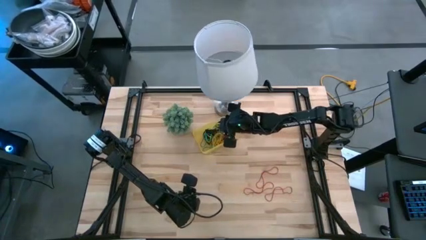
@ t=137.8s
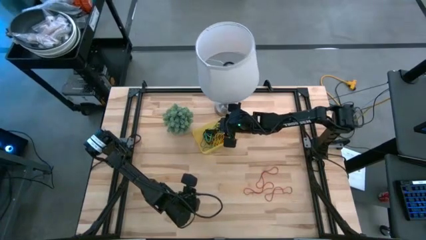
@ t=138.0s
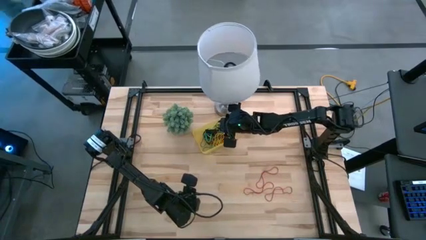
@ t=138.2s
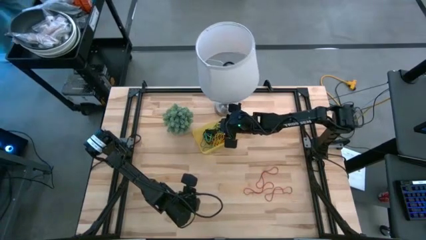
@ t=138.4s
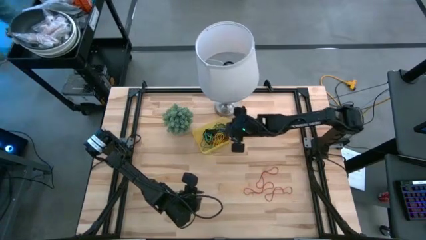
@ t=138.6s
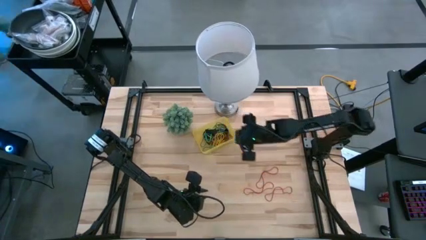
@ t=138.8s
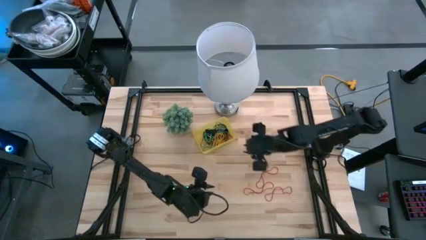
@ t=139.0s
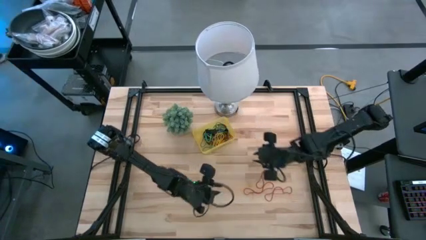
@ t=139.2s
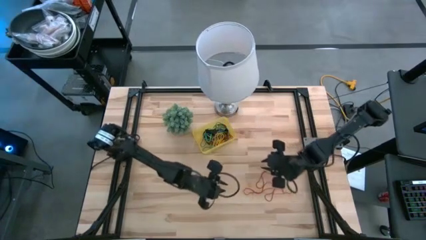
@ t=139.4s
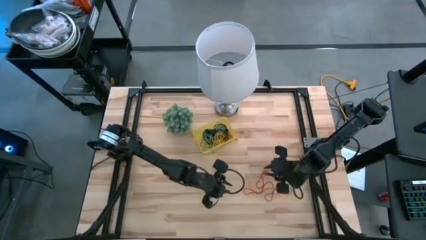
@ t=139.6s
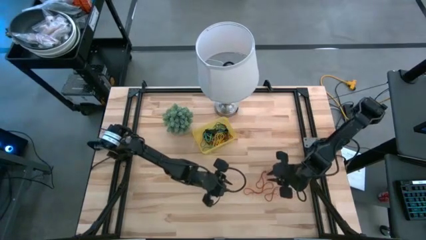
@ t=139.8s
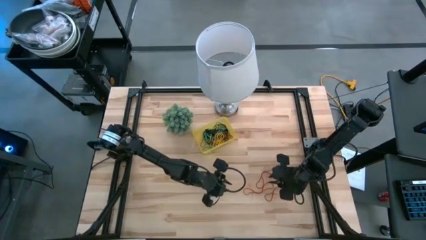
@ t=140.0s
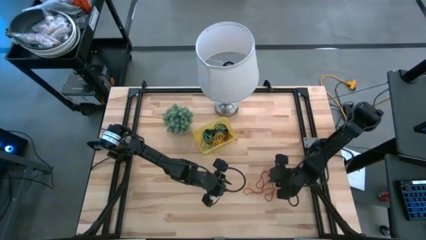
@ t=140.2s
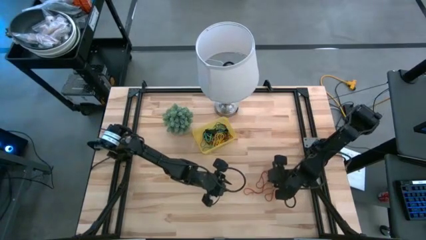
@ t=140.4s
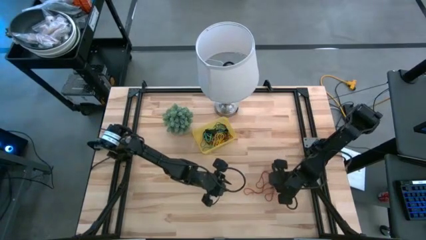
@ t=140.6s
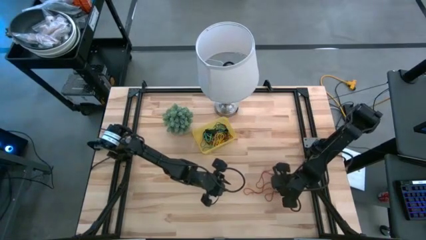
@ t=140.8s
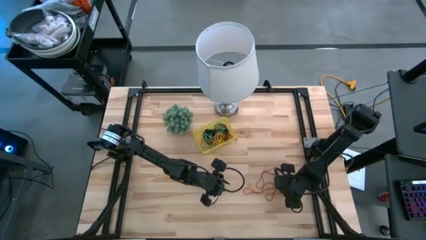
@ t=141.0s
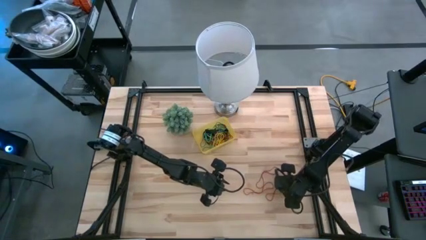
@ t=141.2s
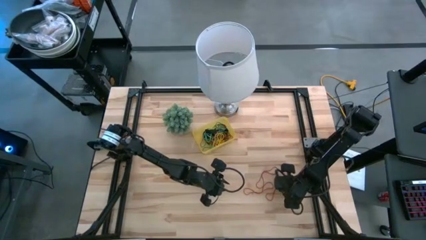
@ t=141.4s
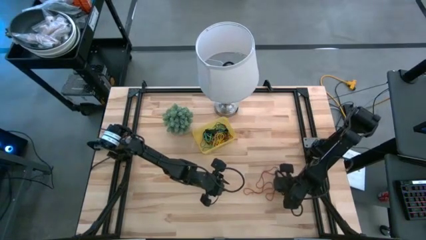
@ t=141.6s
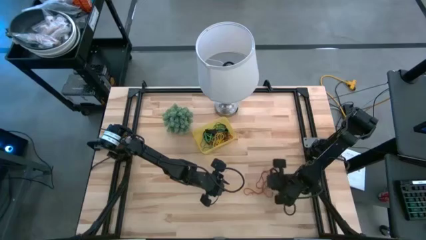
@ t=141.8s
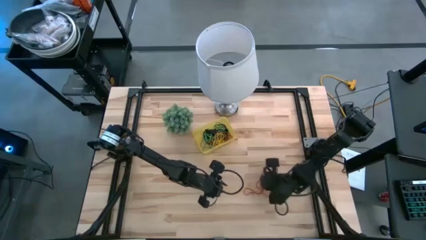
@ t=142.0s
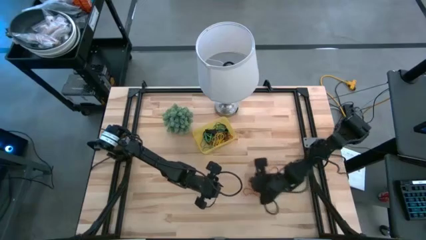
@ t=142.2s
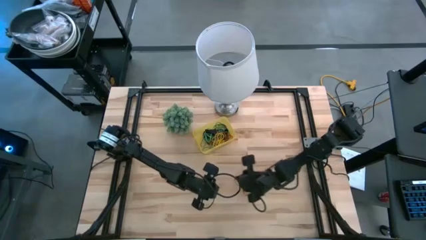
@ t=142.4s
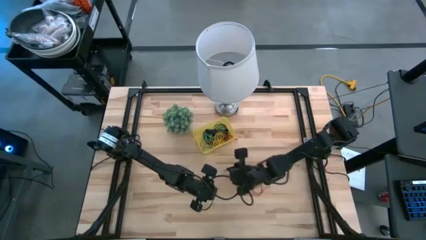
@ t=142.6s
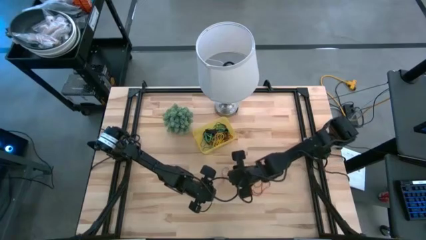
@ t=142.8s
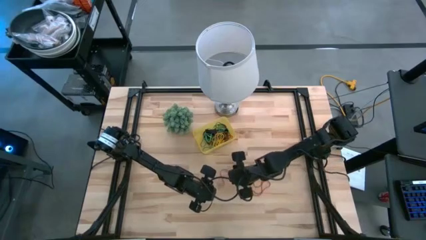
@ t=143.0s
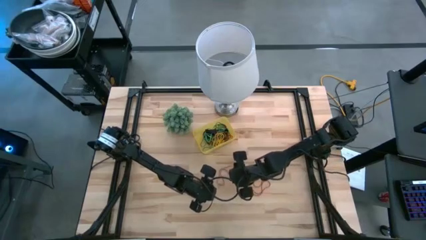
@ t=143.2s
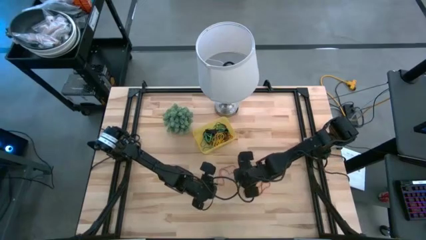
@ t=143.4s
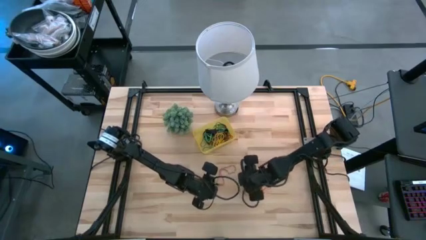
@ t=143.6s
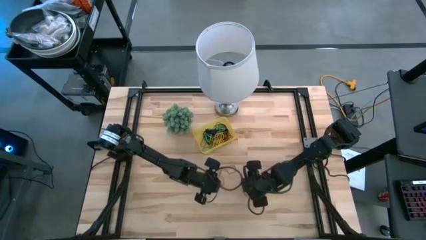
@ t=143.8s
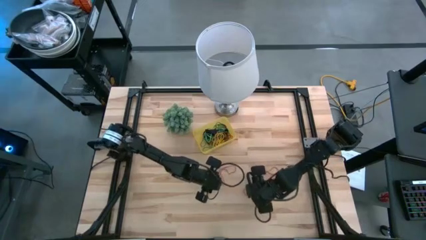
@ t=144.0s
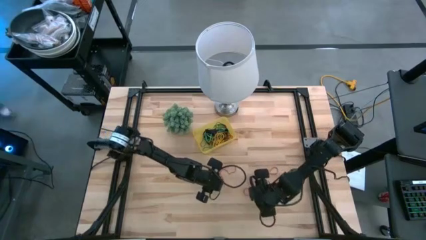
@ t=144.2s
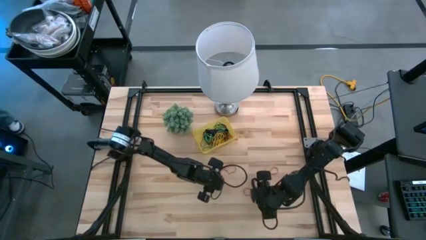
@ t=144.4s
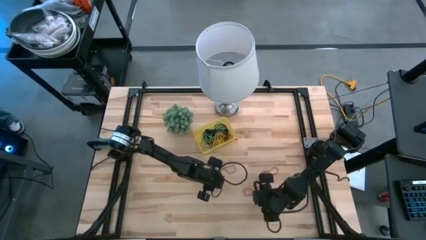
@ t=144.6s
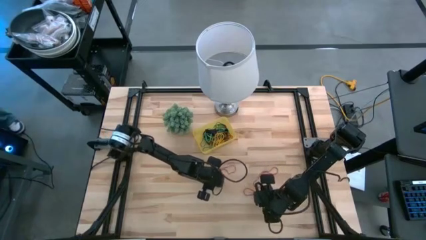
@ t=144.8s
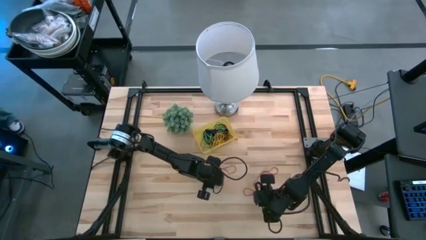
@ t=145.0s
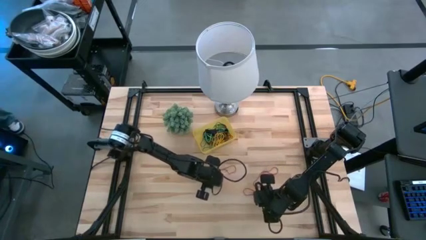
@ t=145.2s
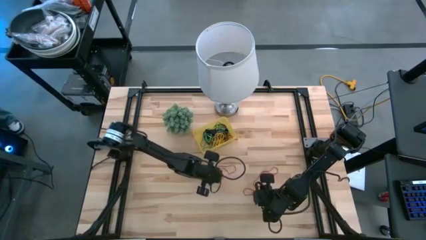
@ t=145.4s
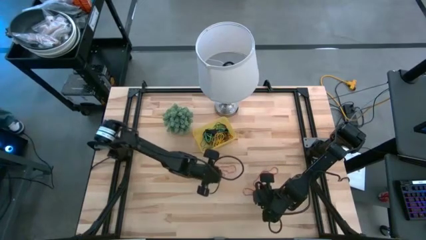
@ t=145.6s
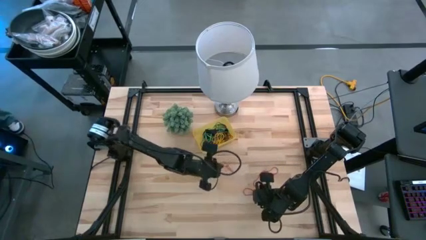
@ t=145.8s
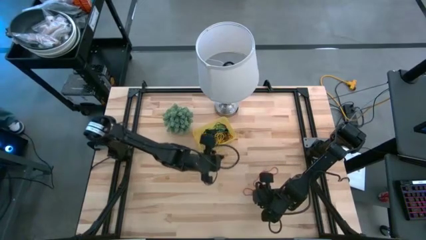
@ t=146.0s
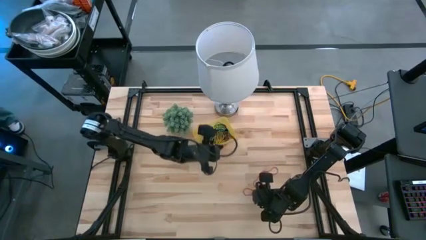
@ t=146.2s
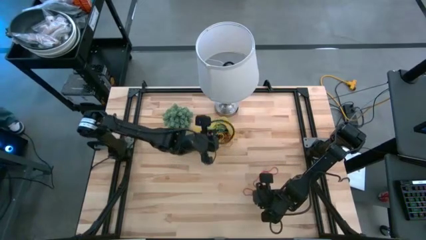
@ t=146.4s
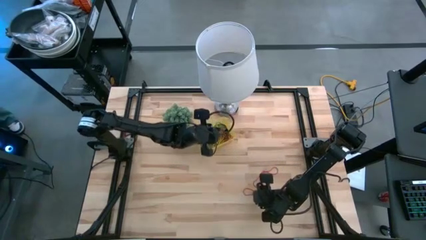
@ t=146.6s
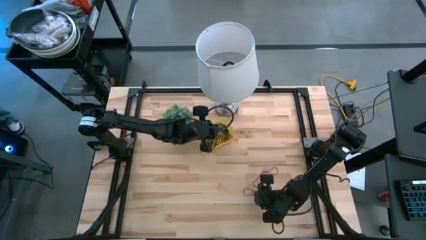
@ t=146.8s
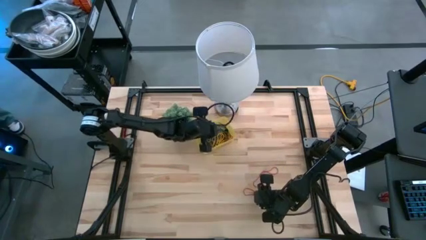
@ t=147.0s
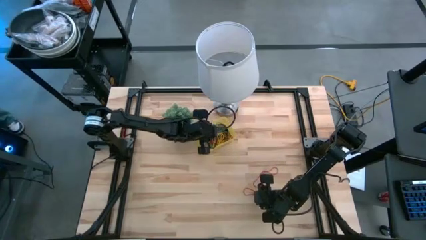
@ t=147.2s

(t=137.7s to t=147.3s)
Task: Pick and place rubber bands into bin
Put the top left red rubber band into the yellow bin

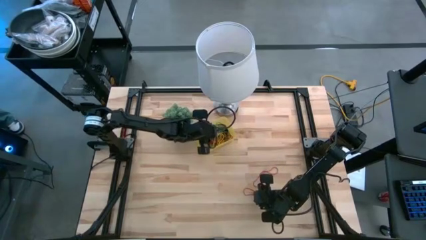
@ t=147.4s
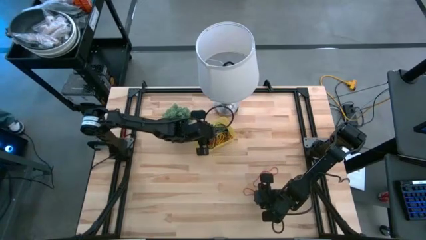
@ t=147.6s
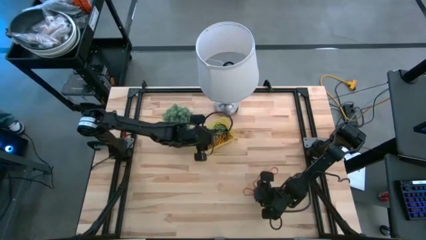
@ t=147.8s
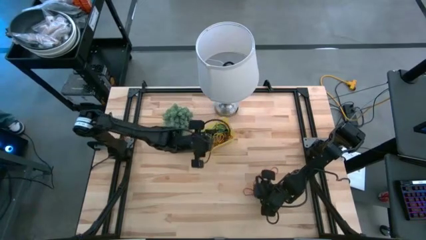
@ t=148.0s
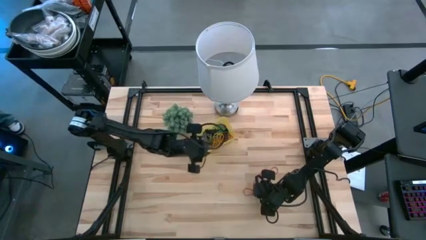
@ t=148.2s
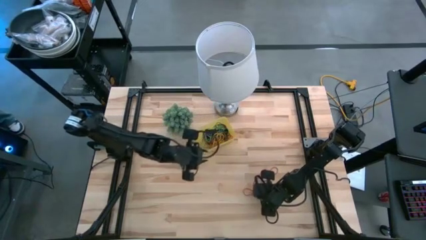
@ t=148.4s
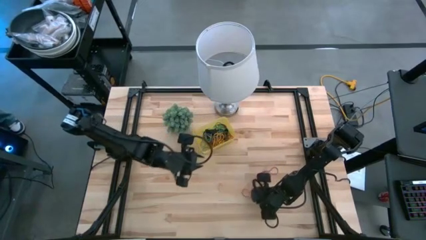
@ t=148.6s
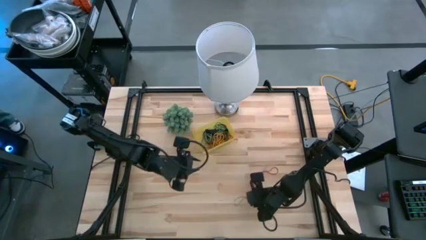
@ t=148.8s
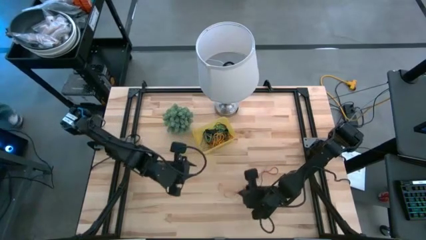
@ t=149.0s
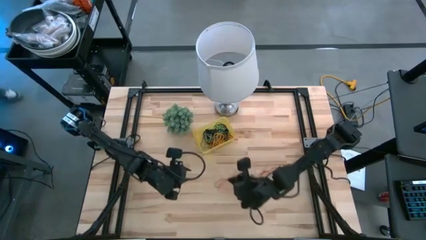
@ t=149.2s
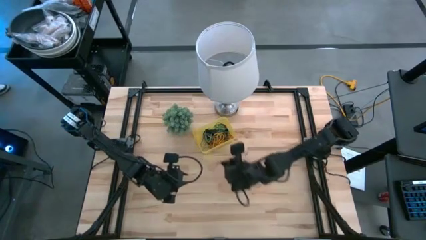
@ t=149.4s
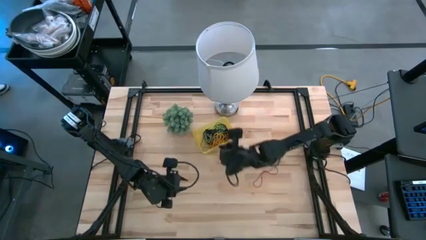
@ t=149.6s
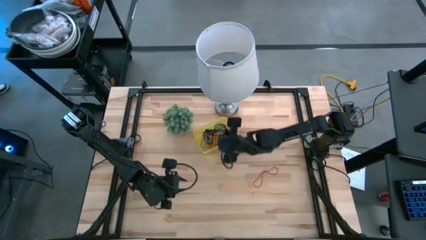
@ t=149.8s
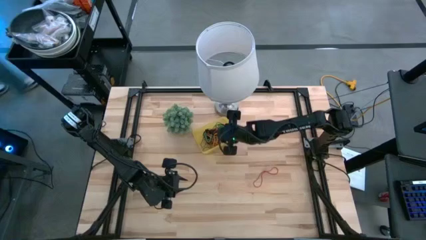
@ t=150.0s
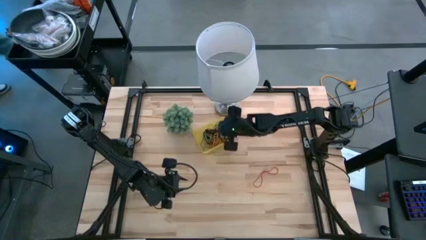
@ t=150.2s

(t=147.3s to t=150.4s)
Put the bottom red rubber band into the yellow bin

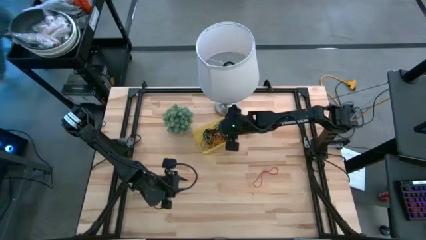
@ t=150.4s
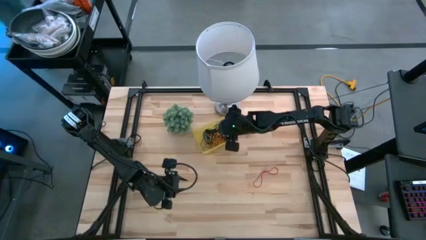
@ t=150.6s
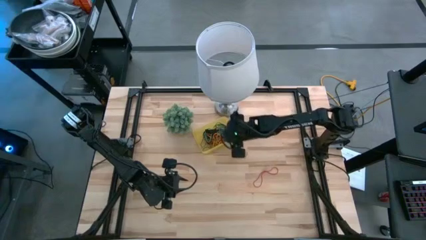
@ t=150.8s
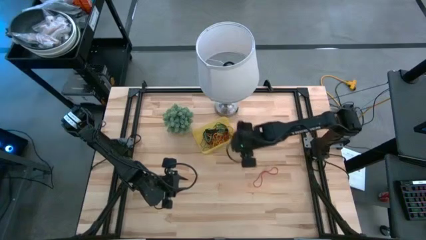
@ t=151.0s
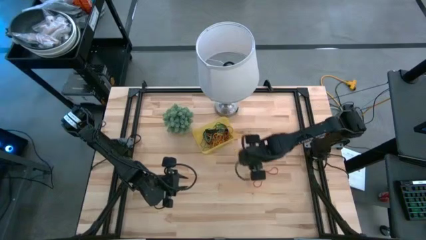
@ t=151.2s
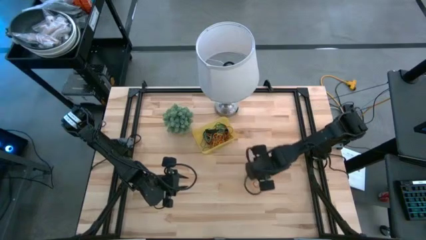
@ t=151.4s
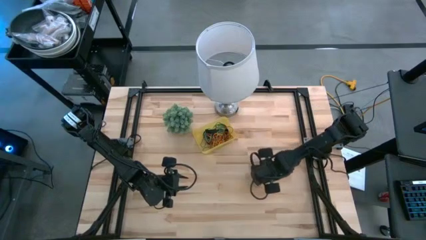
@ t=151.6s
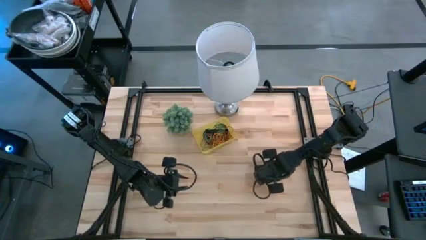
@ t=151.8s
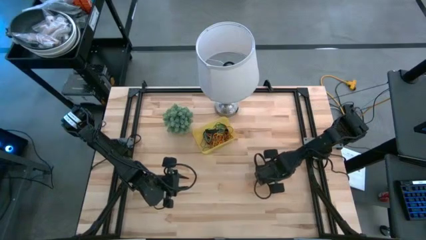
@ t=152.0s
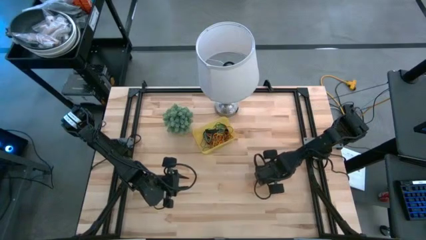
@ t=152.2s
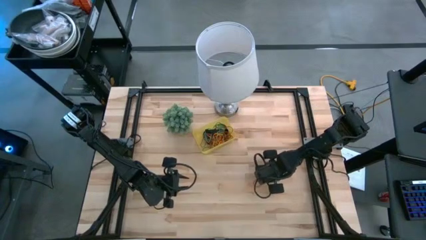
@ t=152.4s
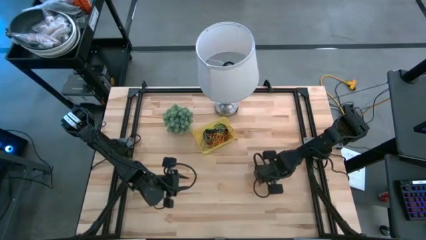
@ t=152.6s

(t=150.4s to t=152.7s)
Put the red rubber band into the yellow bin

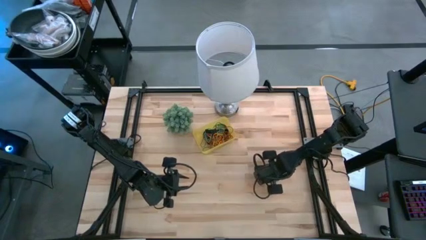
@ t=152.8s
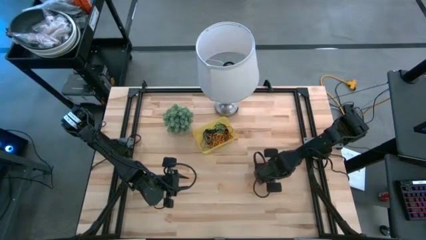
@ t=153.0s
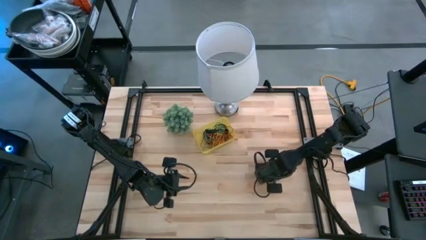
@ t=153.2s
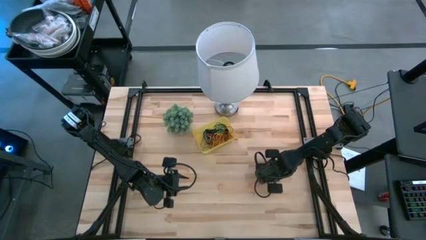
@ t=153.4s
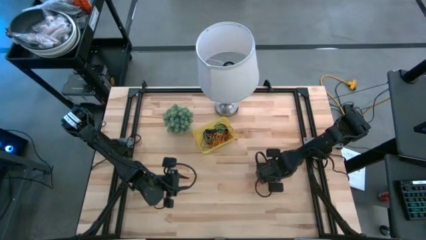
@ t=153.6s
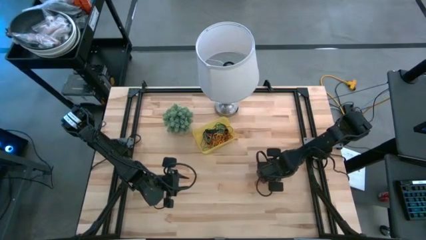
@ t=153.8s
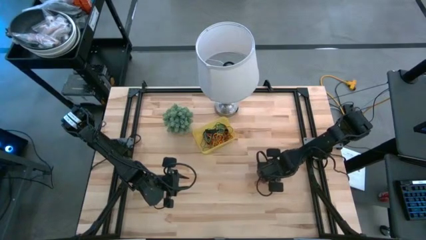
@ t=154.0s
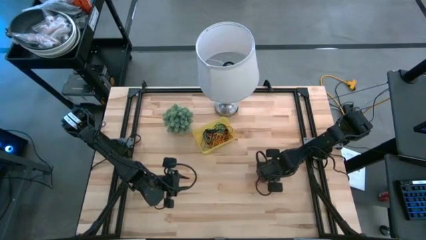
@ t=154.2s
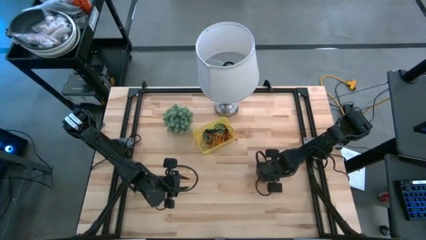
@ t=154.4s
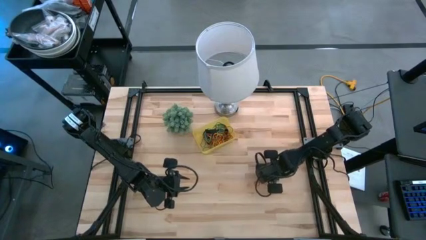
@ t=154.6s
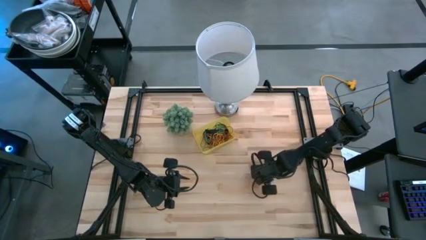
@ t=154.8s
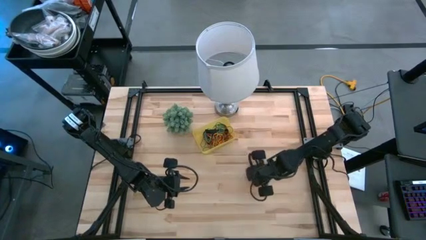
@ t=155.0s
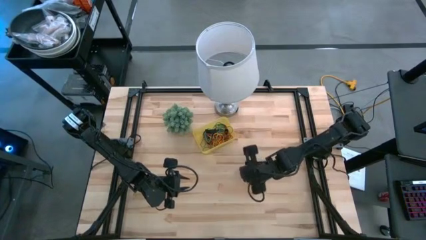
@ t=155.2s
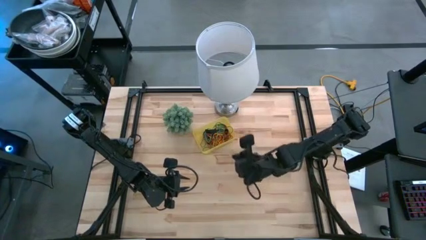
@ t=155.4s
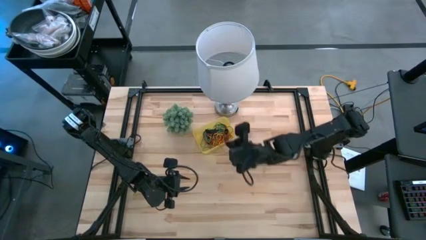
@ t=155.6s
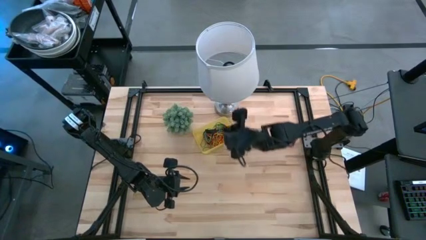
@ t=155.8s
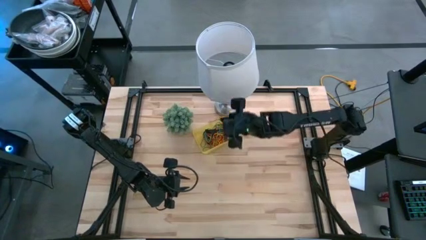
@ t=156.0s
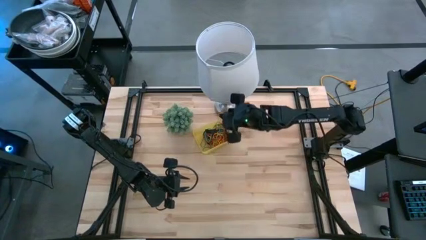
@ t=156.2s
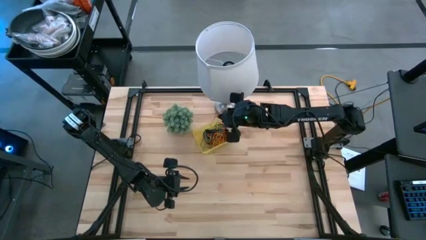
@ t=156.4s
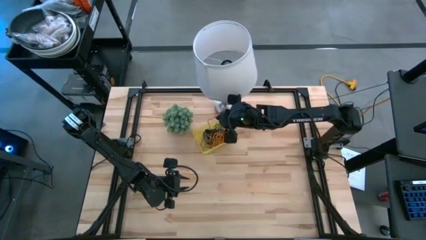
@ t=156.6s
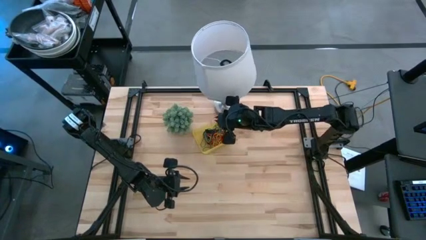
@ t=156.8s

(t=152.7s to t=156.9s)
Put the red rubber band into the yellow bin
